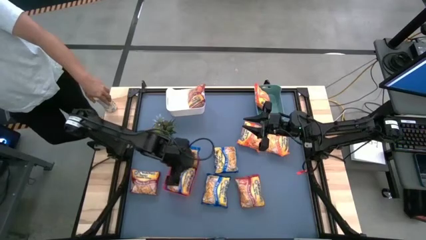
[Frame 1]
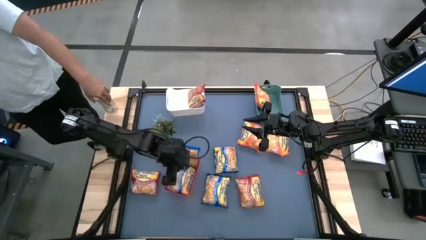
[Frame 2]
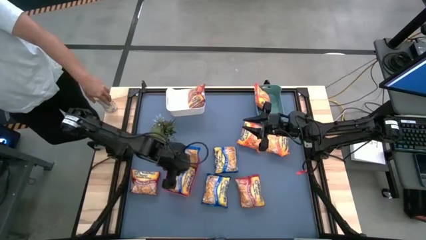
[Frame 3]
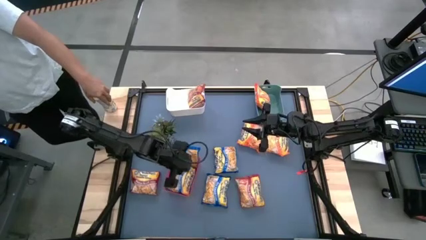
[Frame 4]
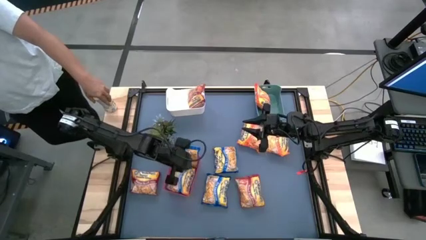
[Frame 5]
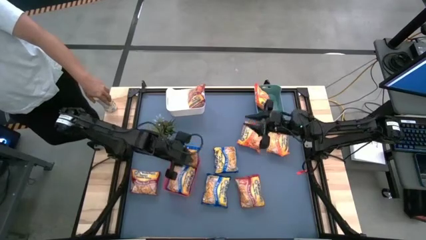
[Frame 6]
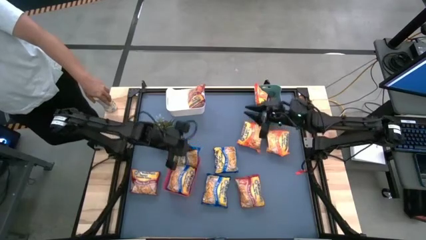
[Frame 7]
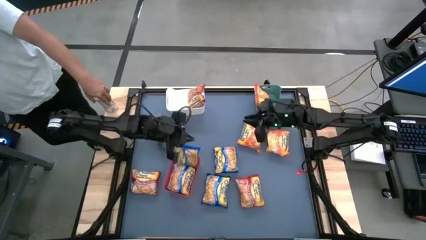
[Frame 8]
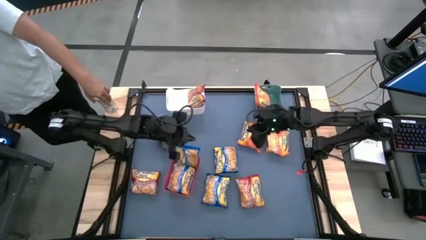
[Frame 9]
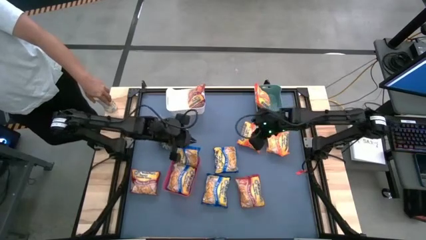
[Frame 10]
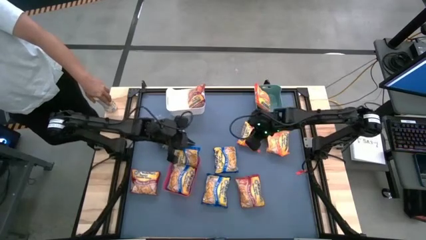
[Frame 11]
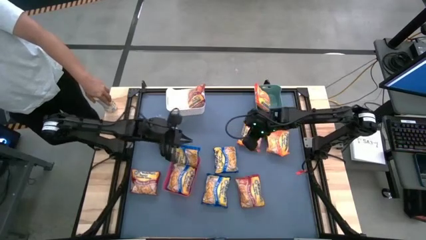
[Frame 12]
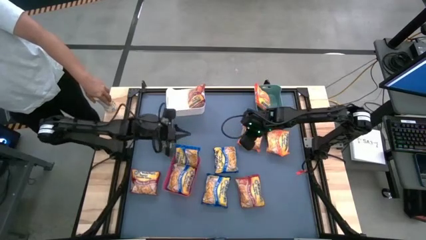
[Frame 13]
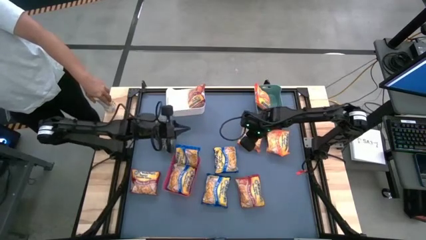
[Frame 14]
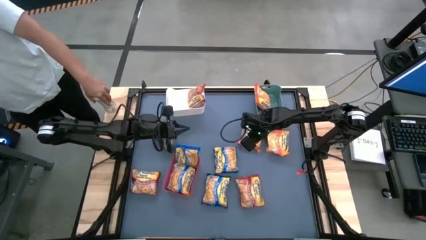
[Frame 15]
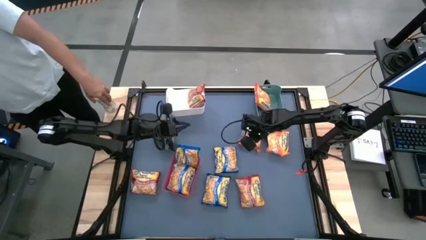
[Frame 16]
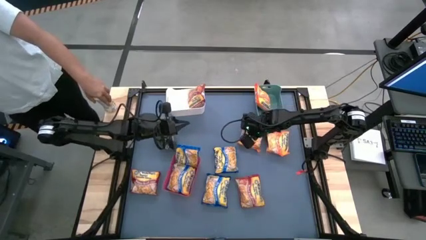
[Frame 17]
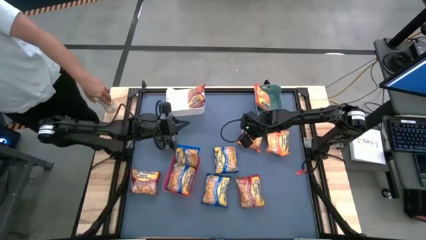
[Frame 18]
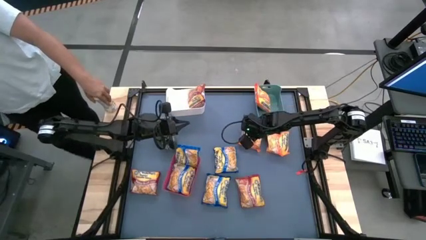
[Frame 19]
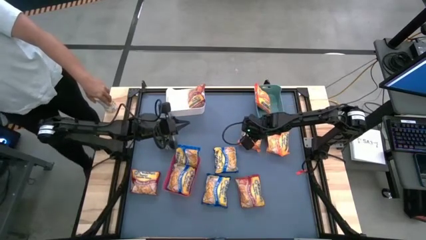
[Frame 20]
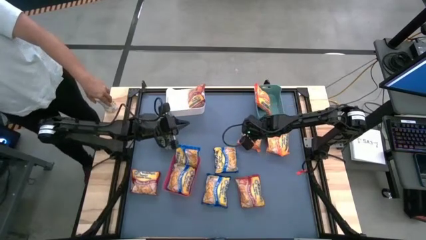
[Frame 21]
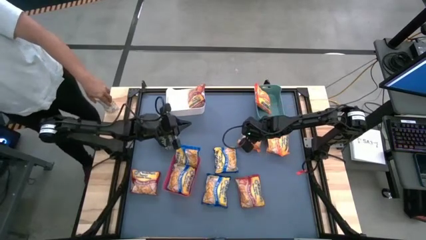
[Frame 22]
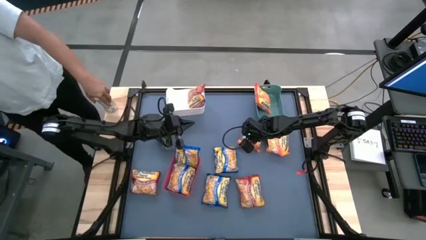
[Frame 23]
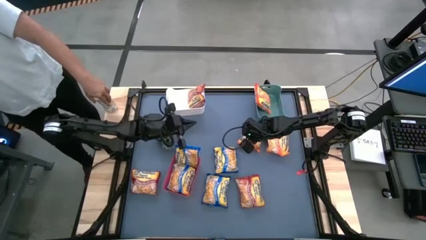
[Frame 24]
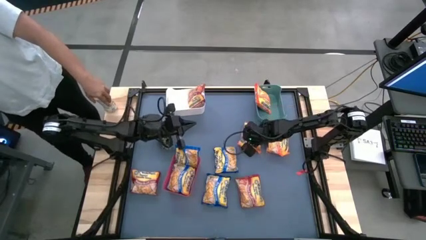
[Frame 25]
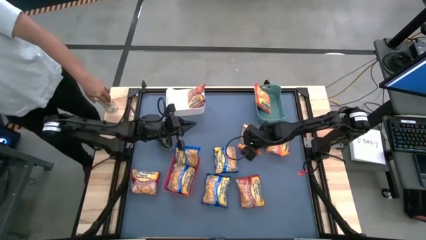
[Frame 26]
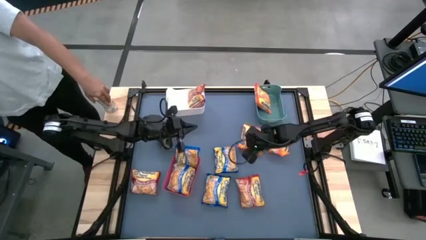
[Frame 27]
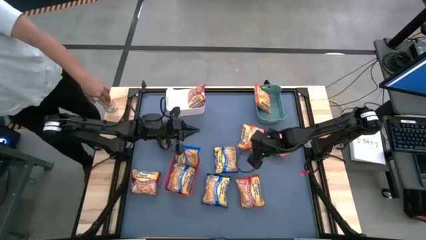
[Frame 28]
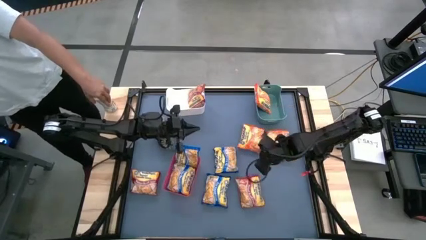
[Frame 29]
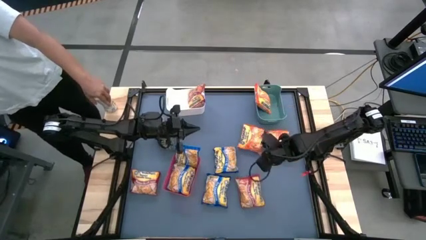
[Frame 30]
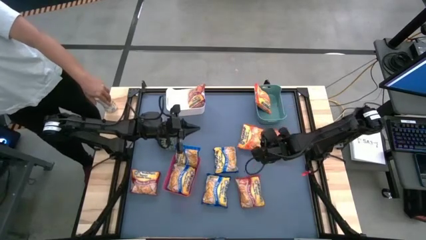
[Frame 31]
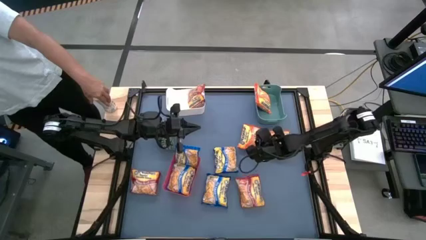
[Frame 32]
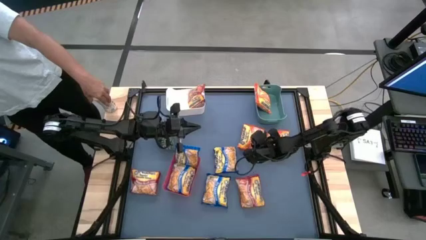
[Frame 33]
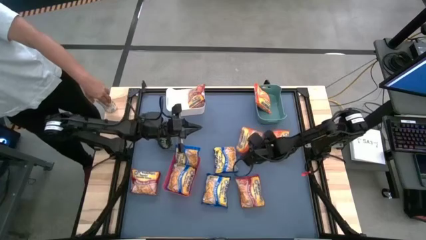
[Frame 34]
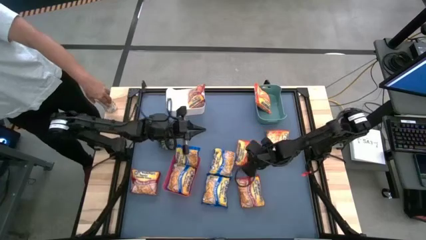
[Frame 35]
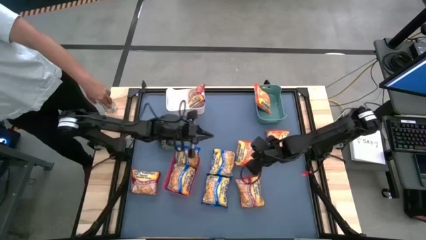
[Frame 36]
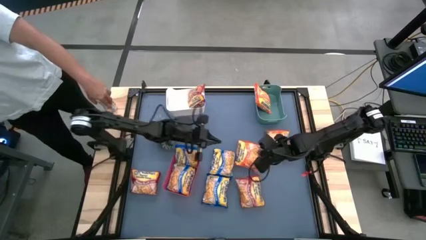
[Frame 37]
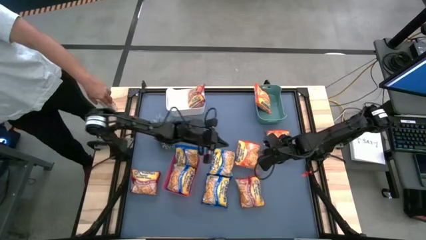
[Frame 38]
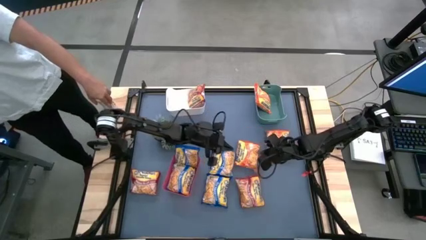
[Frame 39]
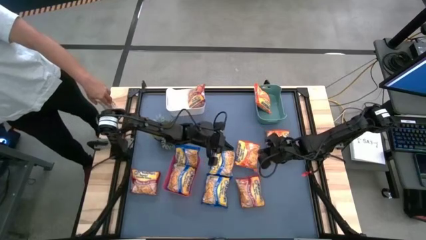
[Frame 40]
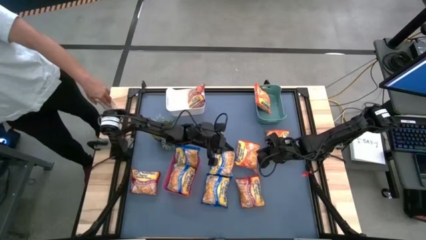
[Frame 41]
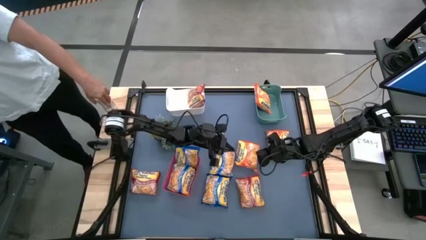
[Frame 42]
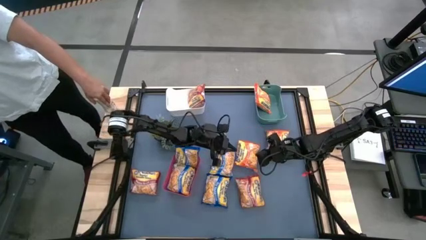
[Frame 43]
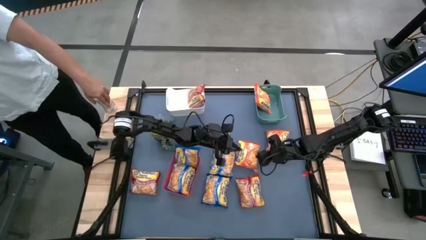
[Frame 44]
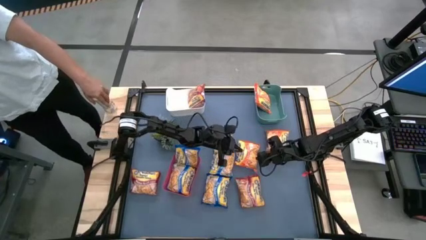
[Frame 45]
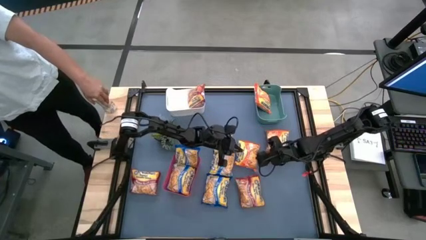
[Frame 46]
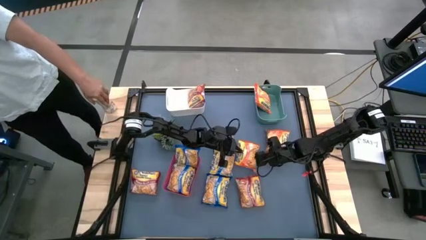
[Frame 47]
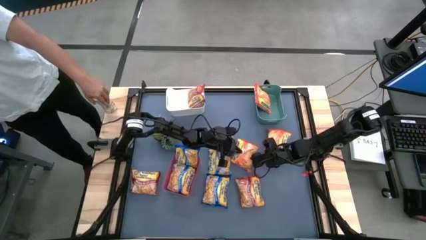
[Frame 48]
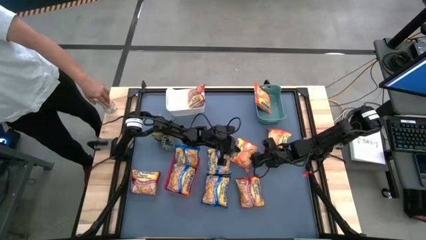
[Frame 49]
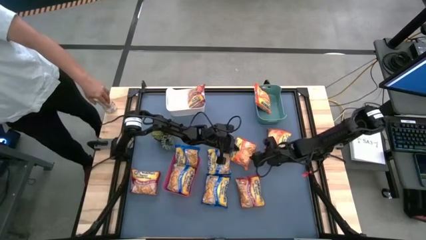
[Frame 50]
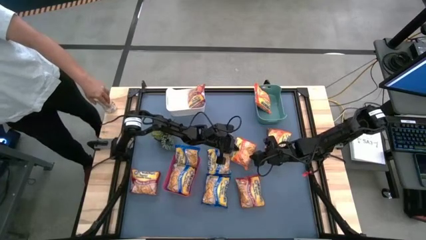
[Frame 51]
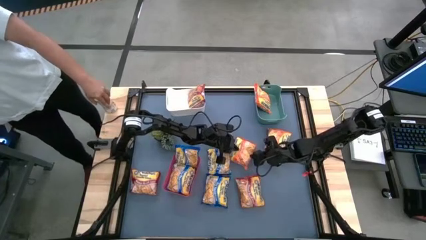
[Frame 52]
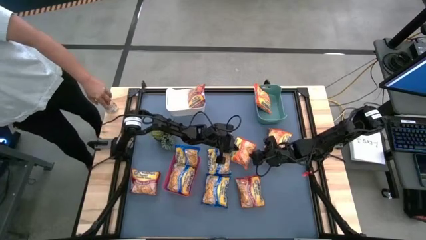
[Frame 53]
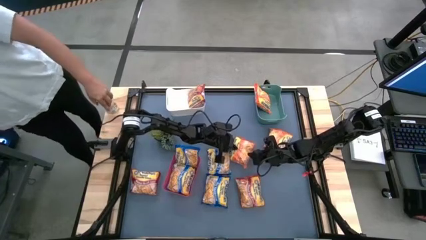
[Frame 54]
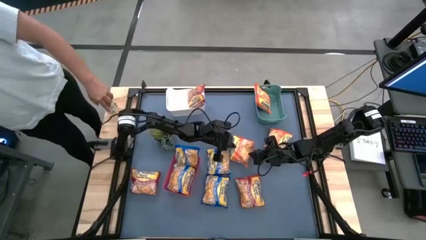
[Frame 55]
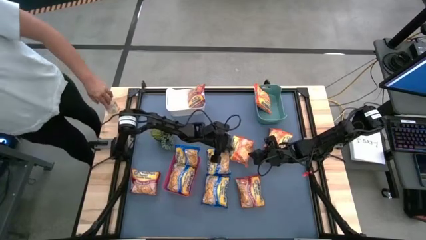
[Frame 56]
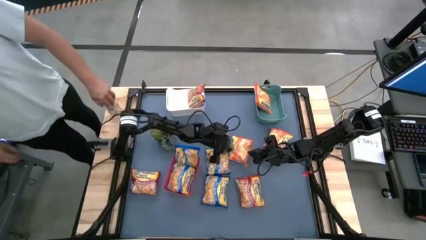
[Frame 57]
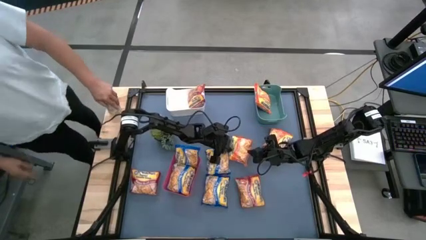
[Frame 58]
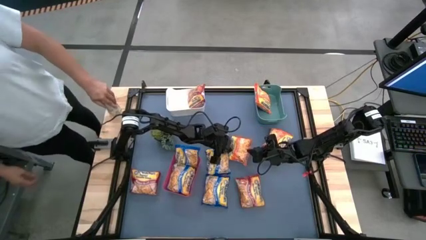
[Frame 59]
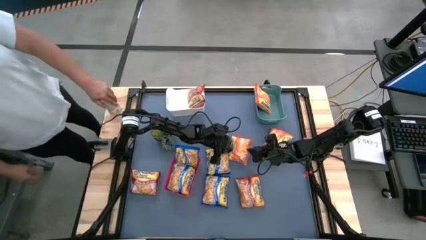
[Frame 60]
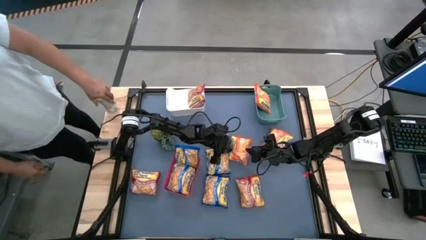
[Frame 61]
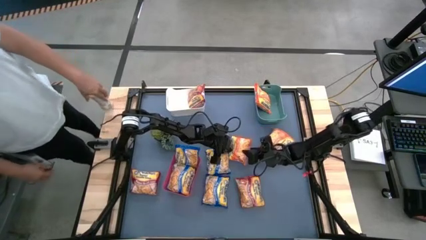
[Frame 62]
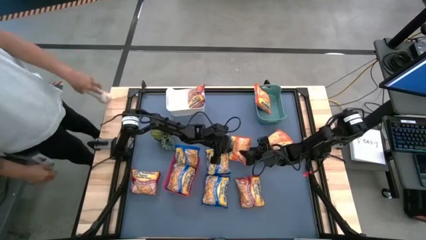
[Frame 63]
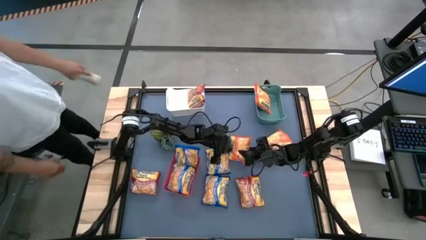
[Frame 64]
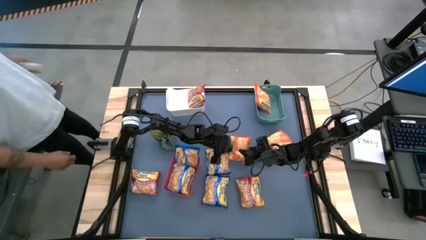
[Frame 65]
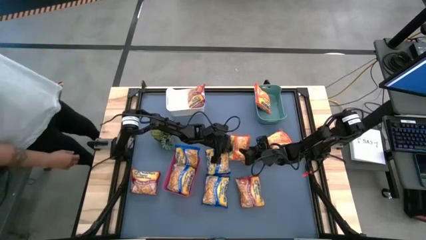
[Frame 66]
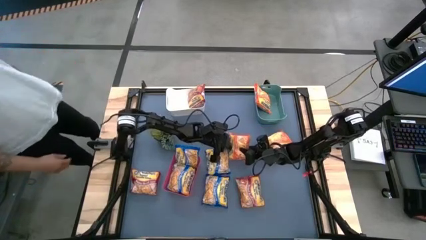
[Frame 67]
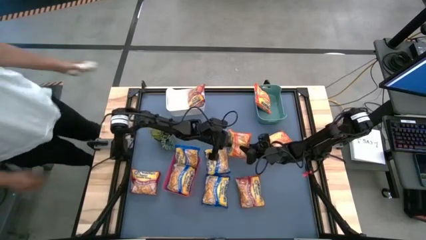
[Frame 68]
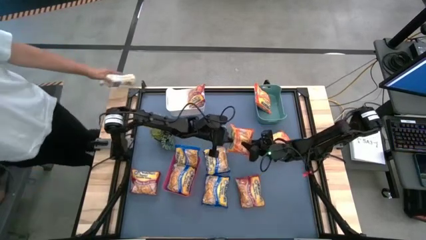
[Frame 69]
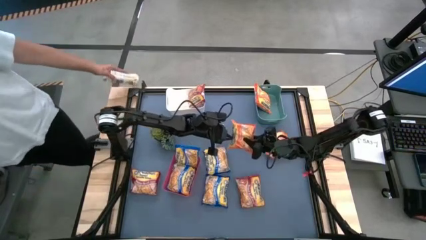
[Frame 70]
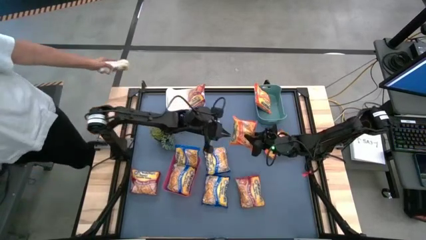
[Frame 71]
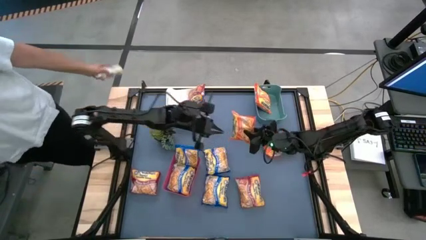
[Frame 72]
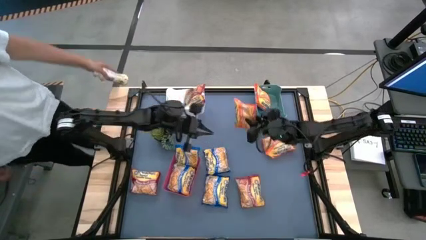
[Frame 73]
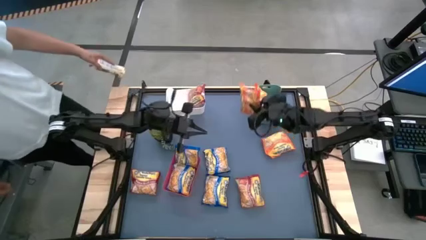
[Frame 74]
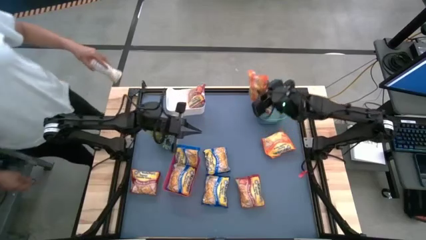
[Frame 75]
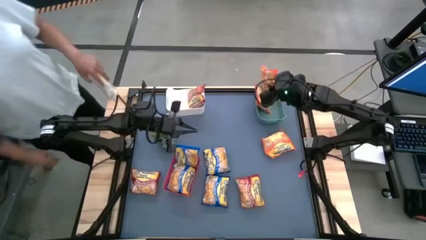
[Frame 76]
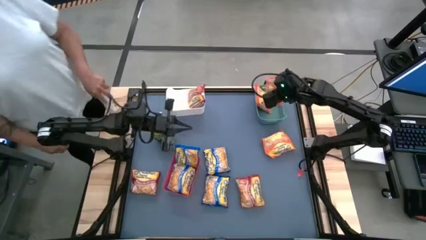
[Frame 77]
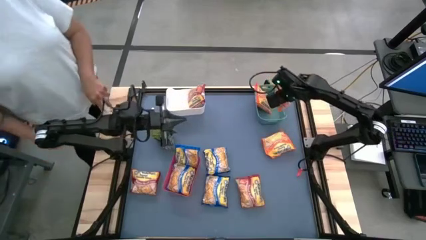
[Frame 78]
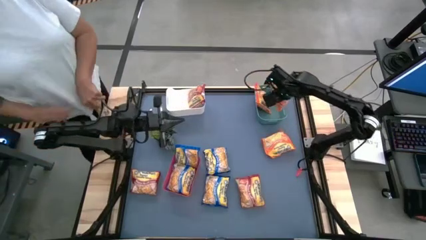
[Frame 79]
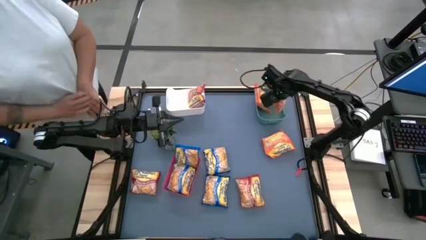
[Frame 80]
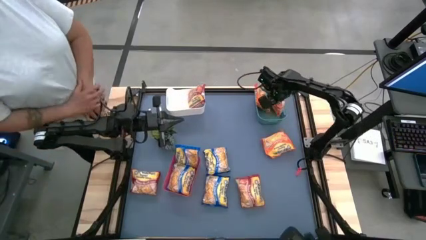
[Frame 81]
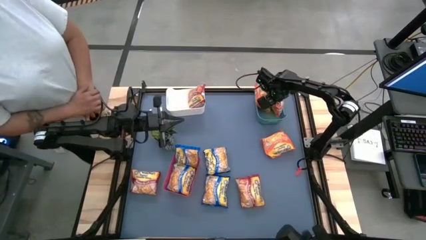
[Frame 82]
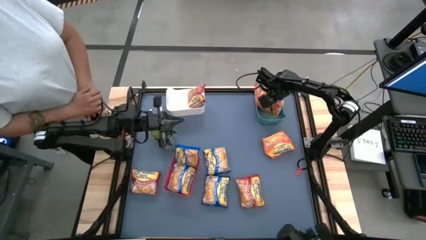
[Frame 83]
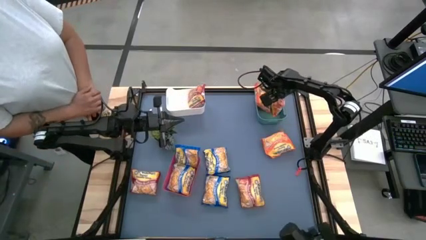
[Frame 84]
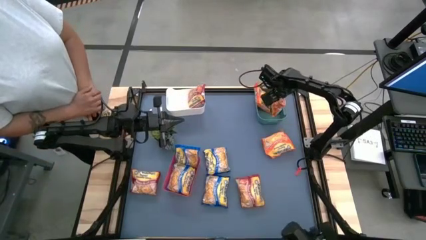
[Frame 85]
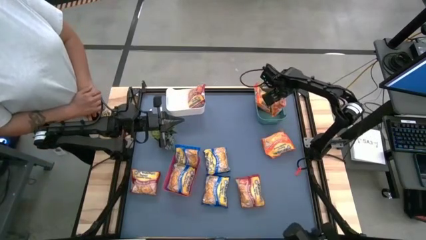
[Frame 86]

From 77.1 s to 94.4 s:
Task: Sort Maruchan noodles
Put the left orange noodle pack into the green bin
